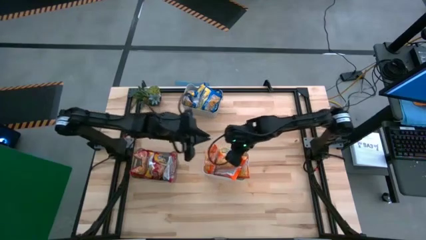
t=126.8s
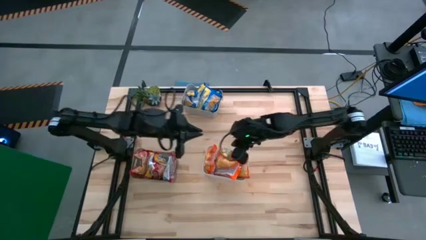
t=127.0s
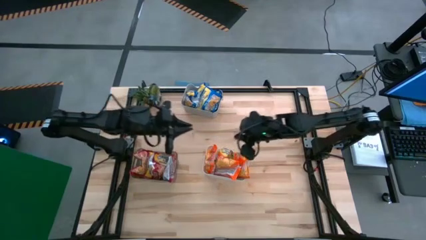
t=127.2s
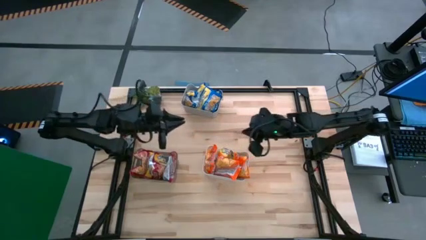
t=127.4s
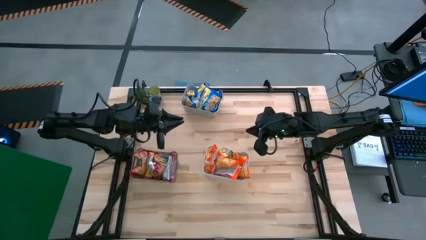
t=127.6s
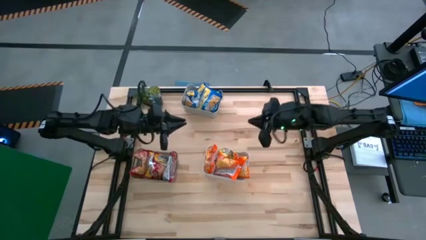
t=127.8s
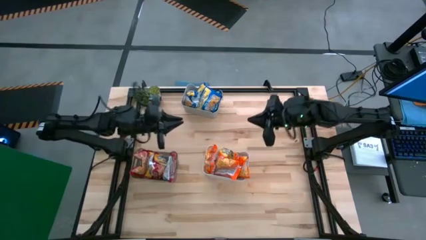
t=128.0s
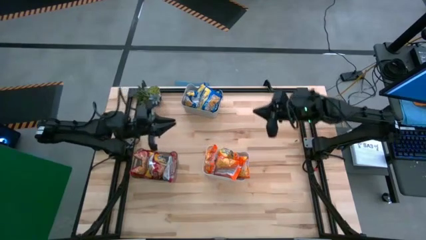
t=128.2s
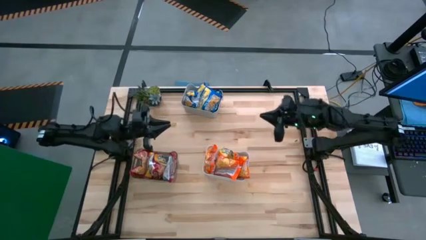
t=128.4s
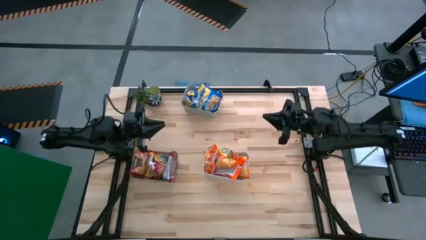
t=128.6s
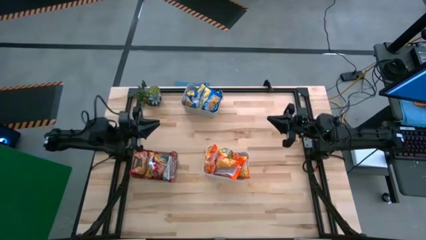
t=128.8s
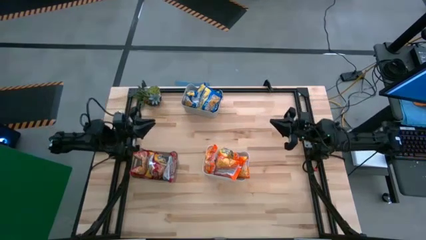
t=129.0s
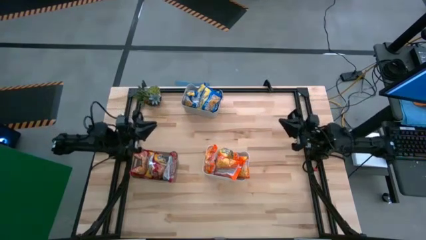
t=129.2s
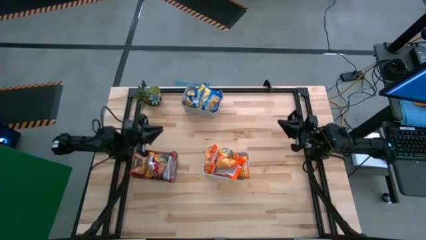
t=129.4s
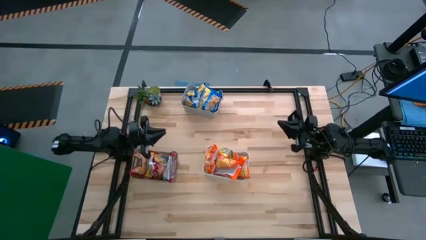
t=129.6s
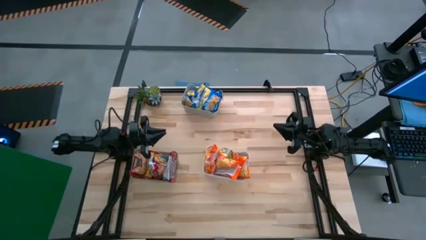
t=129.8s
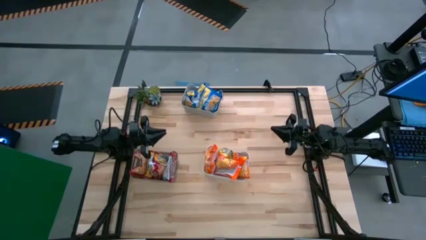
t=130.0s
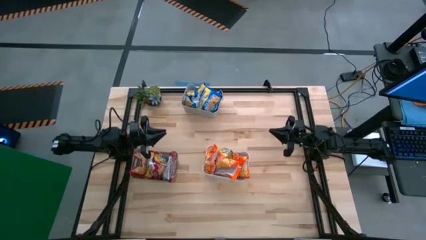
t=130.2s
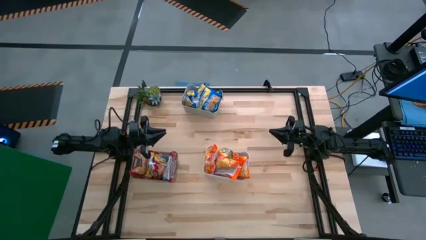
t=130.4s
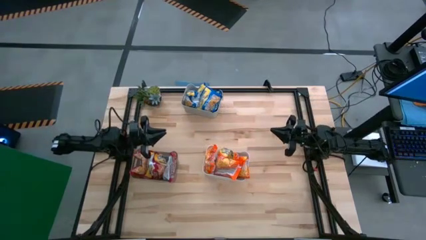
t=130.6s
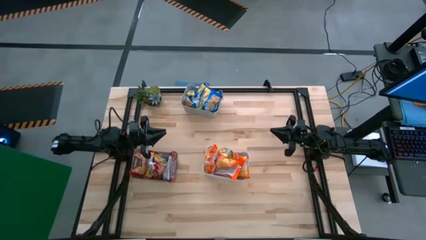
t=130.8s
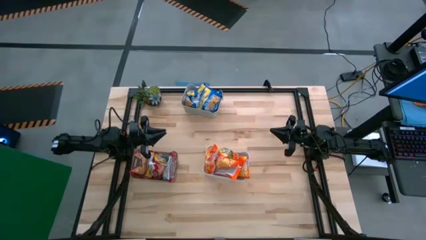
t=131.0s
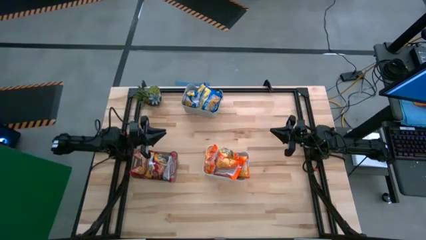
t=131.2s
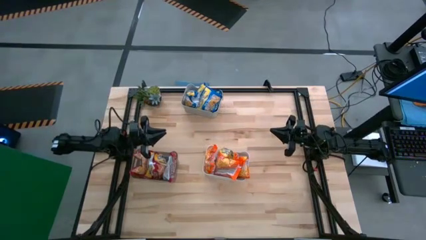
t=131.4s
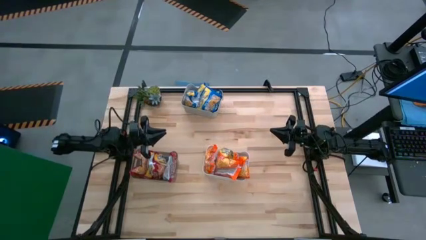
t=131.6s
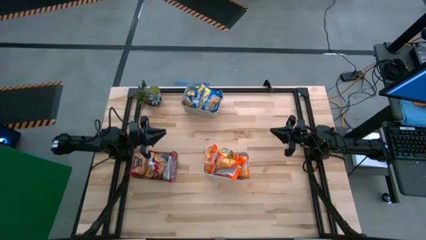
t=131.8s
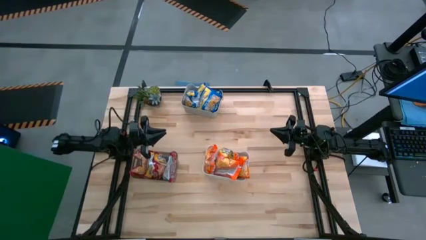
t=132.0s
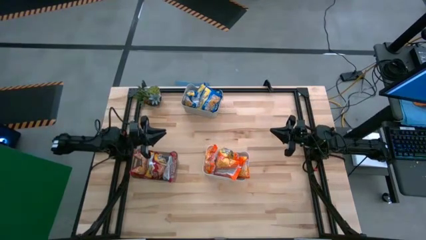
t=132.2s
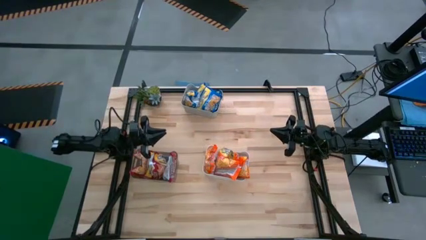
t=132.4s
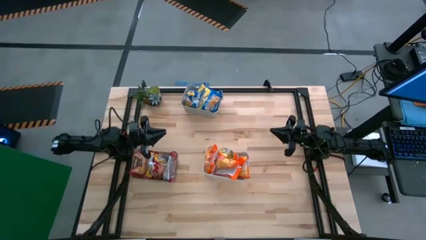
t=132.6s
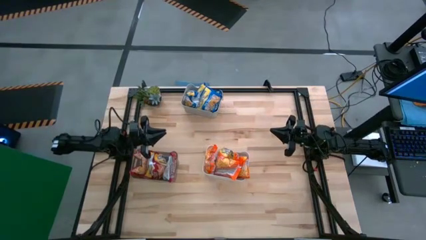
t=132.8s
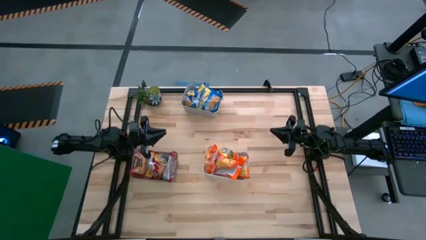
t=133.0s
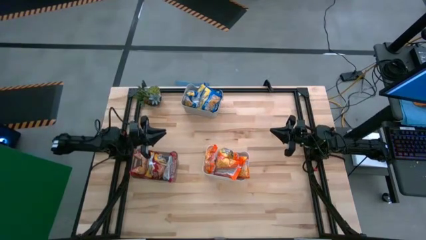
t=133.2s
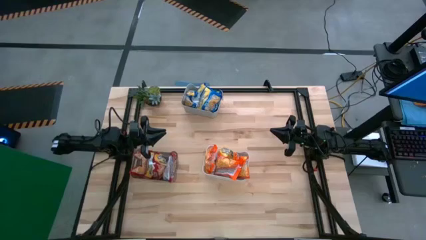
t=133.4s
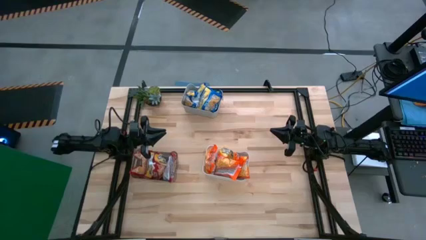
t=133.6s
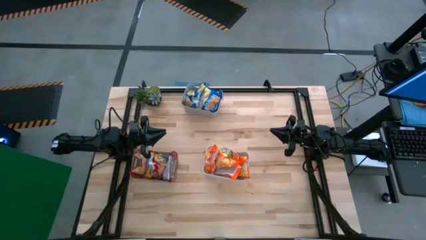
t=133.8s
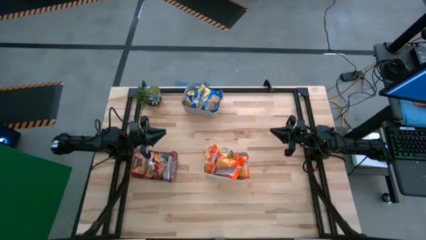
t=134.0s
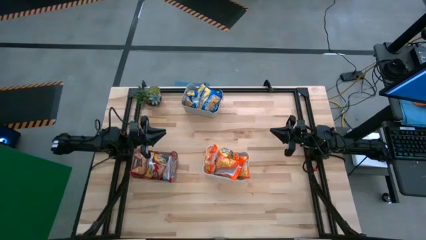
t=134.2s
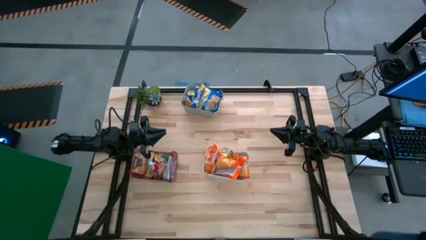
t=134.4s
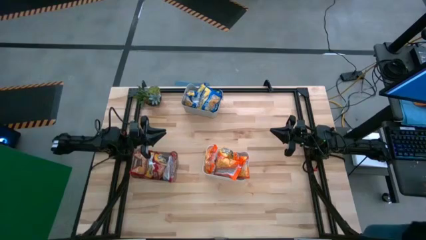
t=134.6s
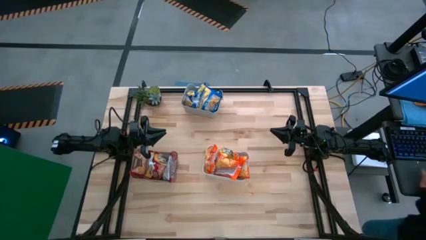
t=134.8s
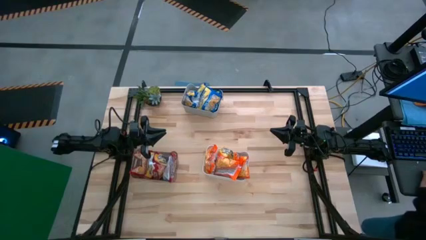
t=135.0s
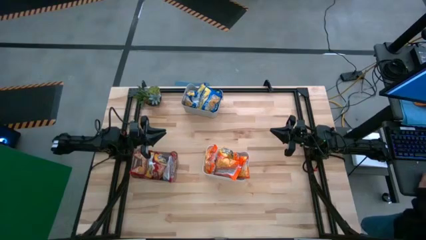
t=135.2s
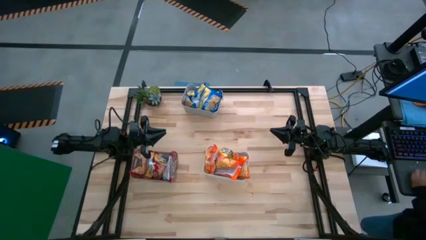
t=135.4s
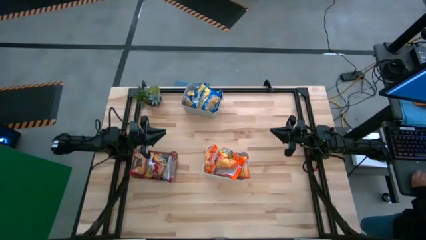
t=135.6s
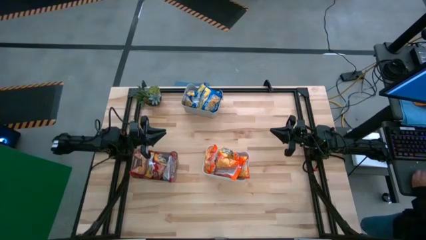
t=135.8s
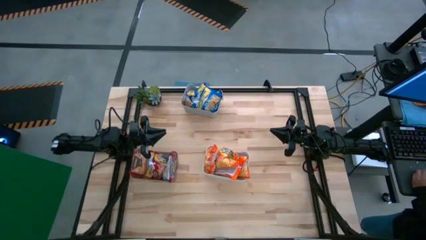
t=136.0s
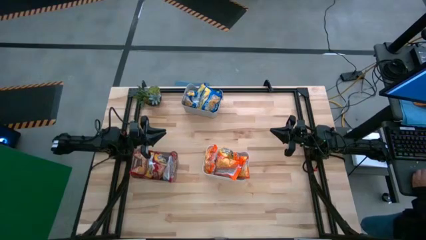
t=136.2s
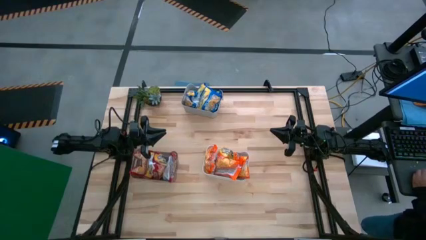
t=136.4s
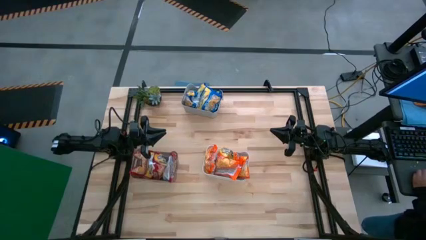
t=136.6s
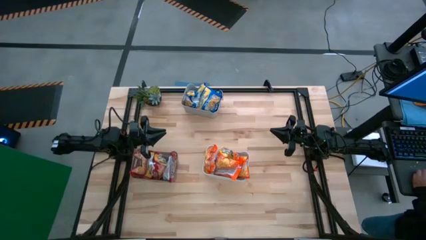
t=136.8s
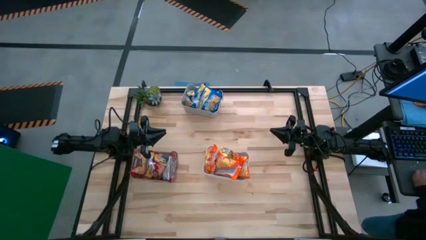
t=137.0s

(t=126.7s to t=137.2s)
Task: Sort Maruchan noodles
Return to Home Position
